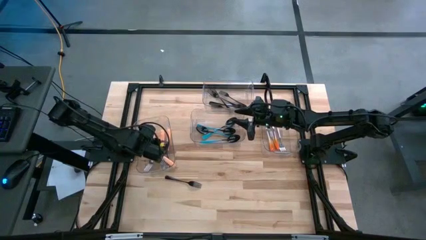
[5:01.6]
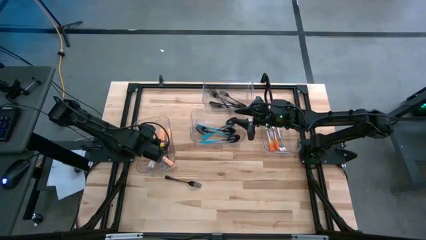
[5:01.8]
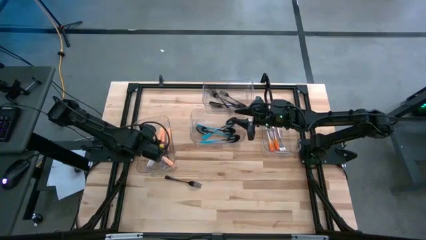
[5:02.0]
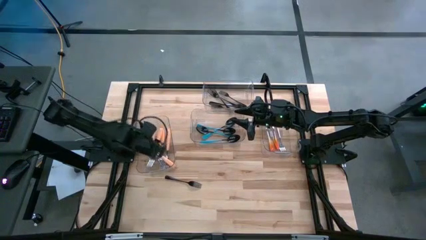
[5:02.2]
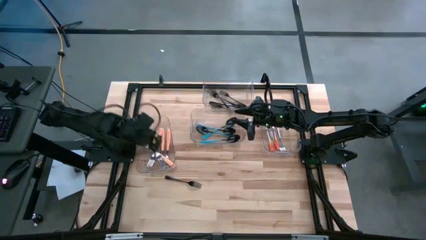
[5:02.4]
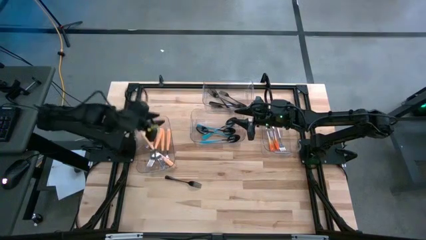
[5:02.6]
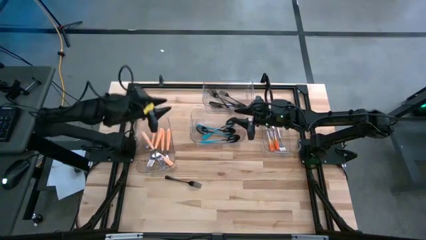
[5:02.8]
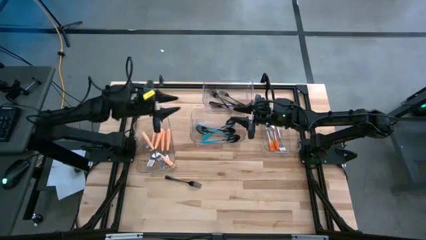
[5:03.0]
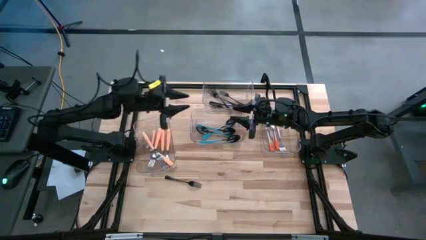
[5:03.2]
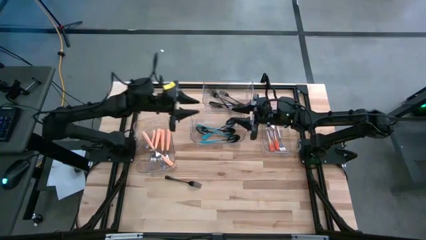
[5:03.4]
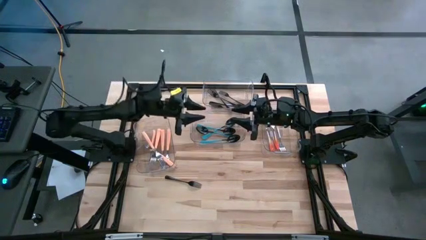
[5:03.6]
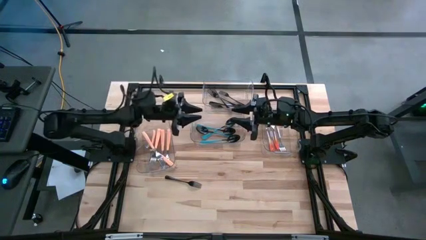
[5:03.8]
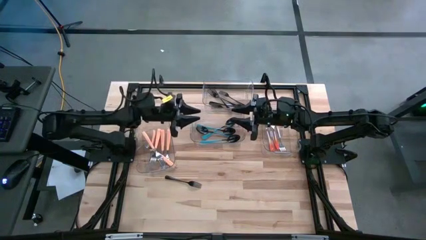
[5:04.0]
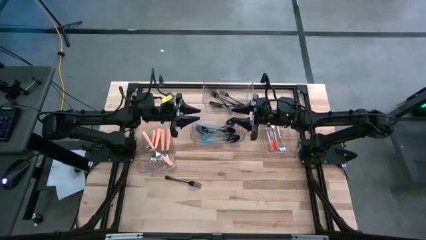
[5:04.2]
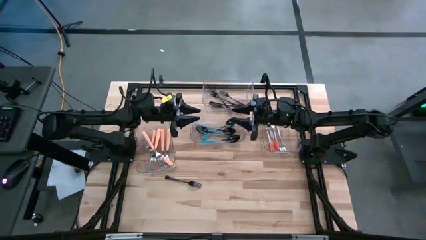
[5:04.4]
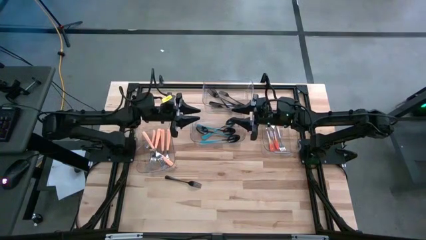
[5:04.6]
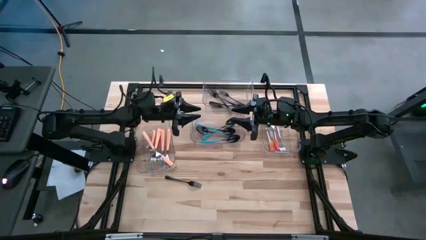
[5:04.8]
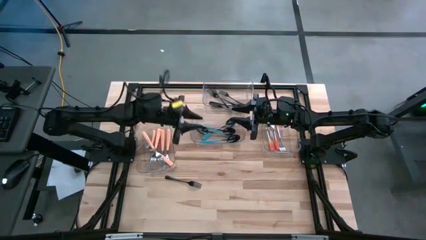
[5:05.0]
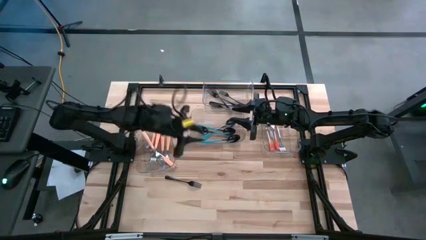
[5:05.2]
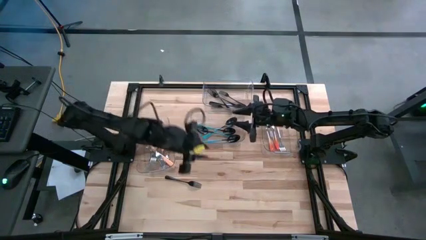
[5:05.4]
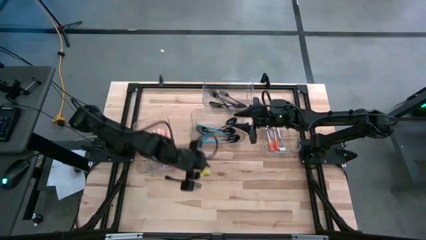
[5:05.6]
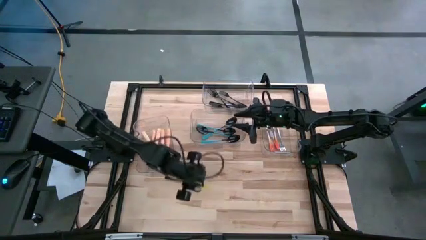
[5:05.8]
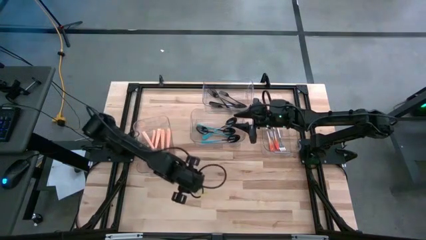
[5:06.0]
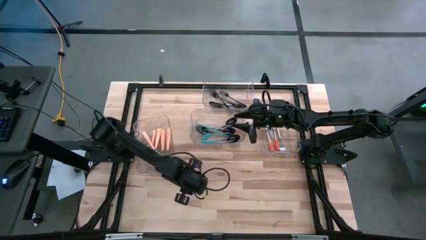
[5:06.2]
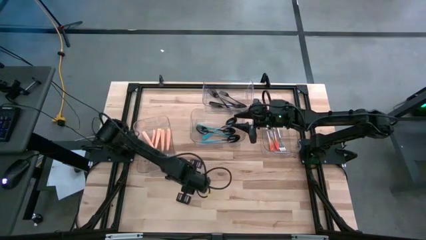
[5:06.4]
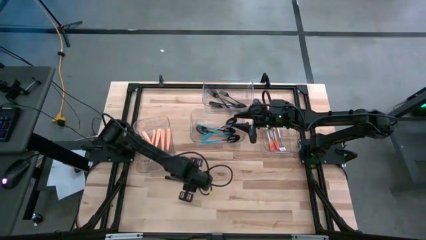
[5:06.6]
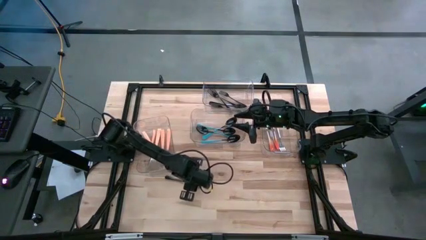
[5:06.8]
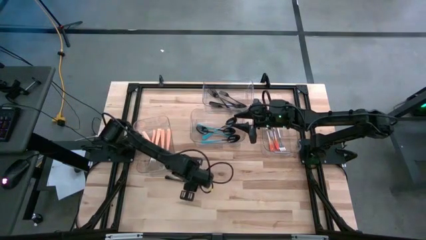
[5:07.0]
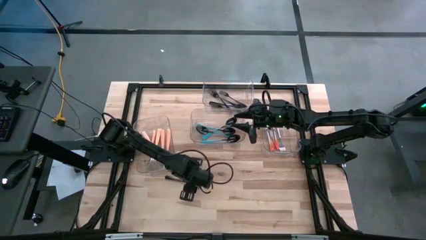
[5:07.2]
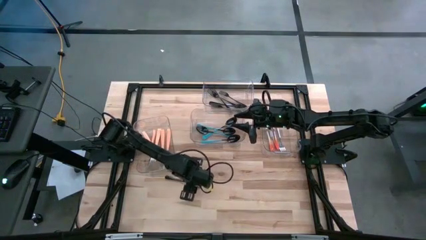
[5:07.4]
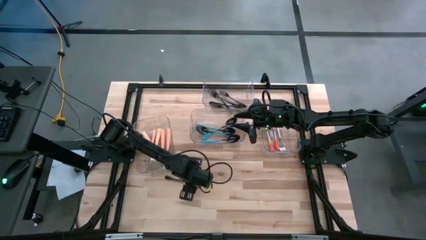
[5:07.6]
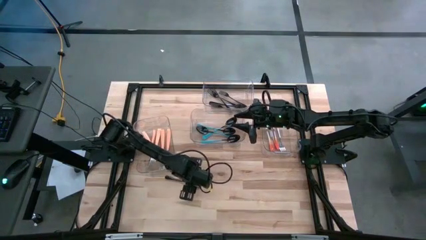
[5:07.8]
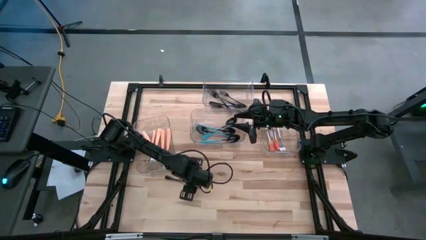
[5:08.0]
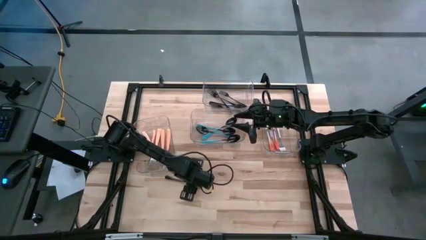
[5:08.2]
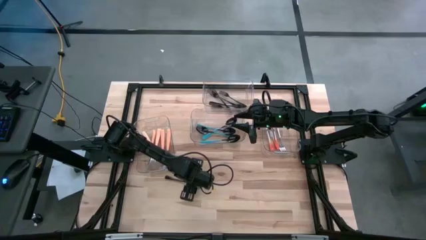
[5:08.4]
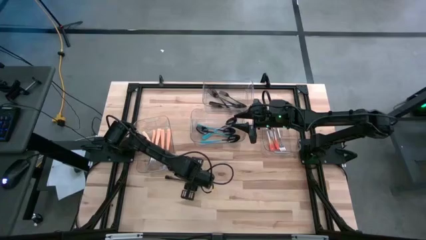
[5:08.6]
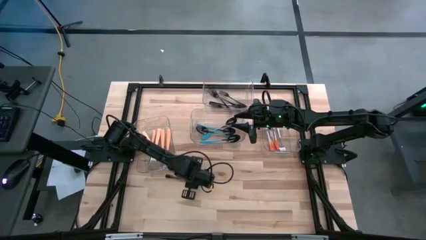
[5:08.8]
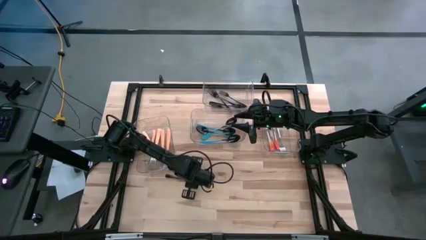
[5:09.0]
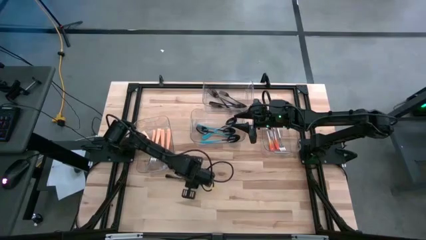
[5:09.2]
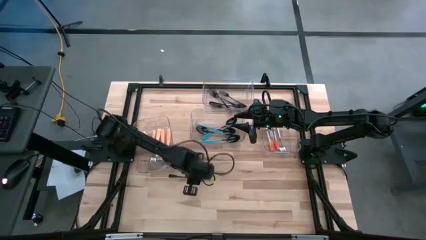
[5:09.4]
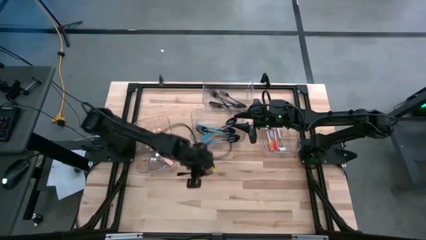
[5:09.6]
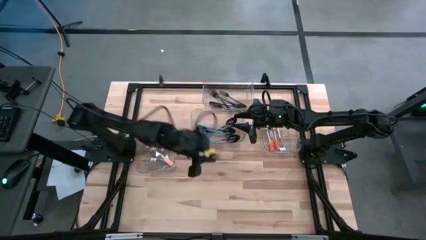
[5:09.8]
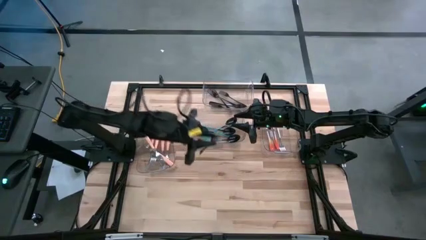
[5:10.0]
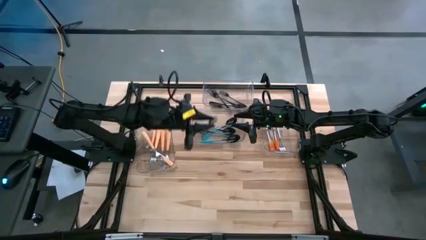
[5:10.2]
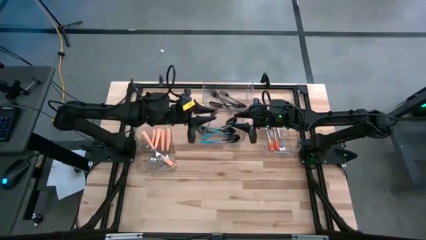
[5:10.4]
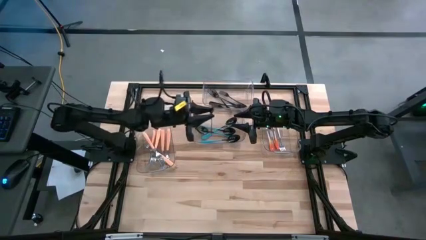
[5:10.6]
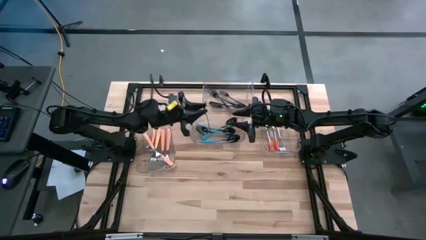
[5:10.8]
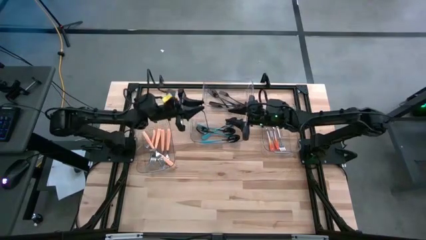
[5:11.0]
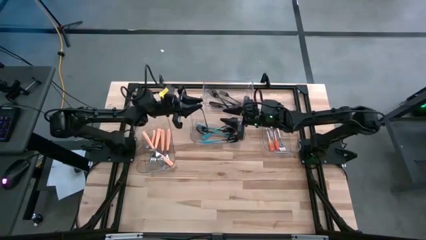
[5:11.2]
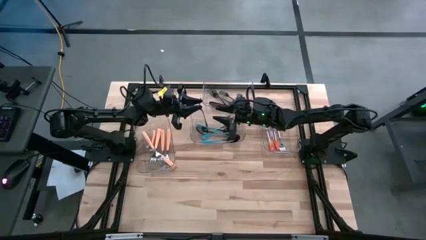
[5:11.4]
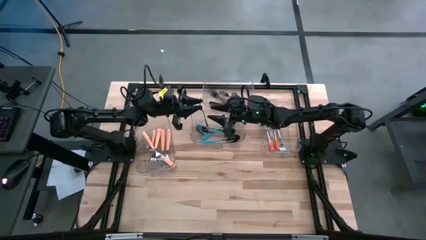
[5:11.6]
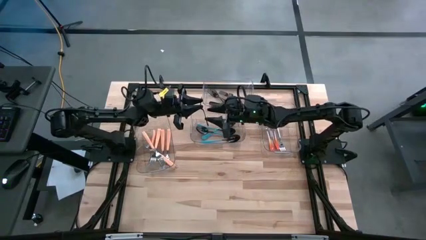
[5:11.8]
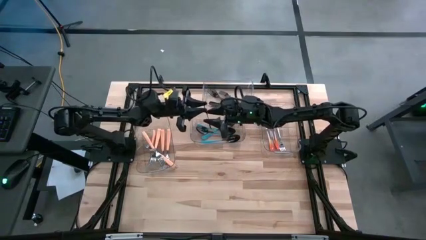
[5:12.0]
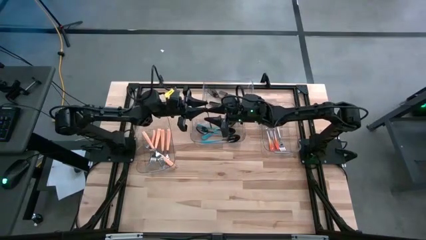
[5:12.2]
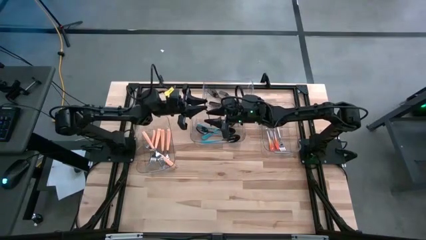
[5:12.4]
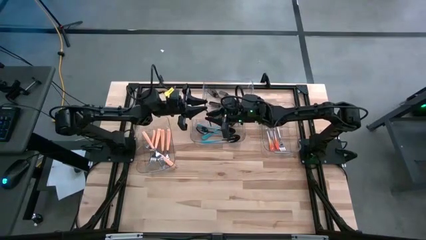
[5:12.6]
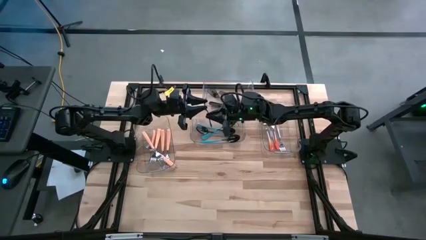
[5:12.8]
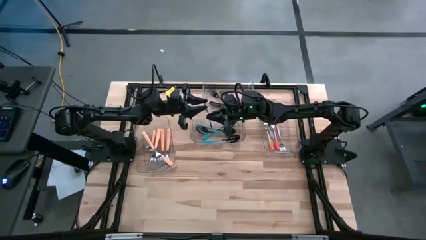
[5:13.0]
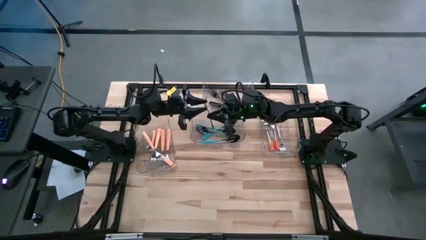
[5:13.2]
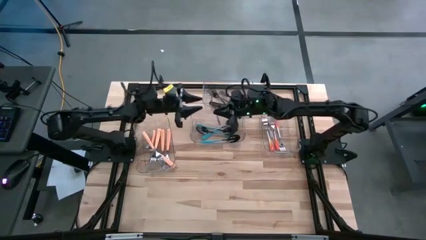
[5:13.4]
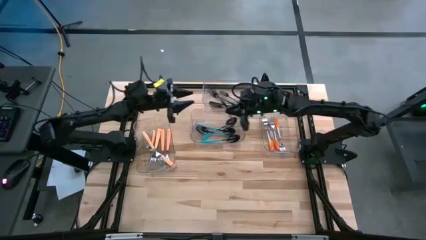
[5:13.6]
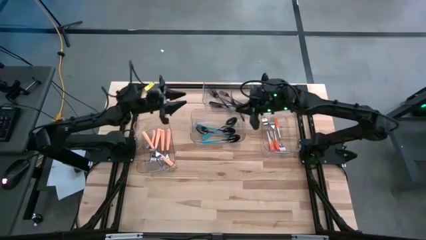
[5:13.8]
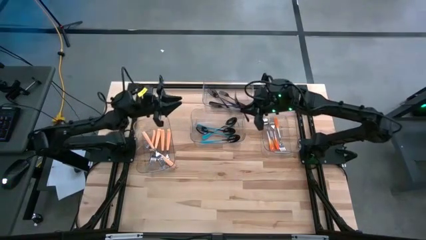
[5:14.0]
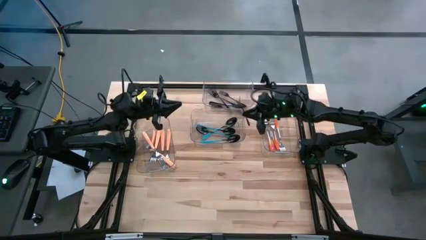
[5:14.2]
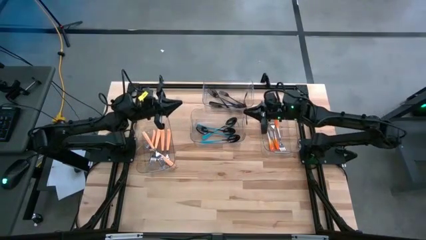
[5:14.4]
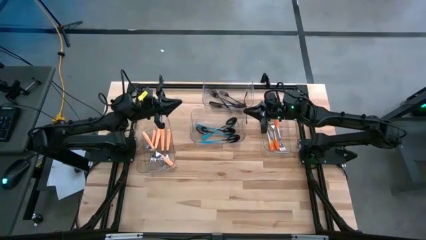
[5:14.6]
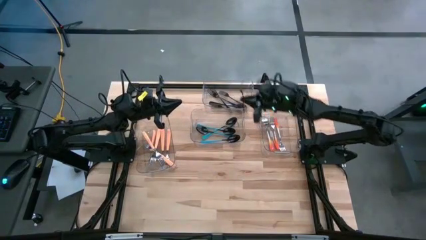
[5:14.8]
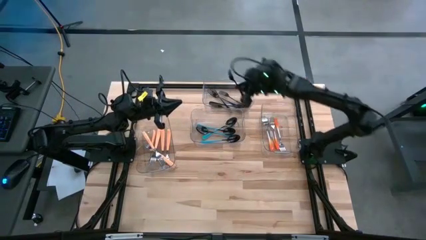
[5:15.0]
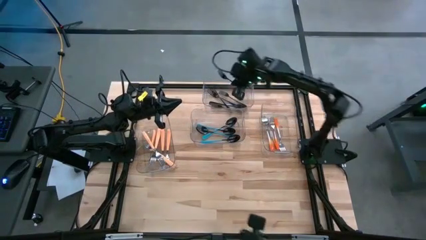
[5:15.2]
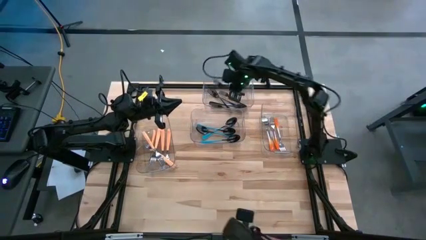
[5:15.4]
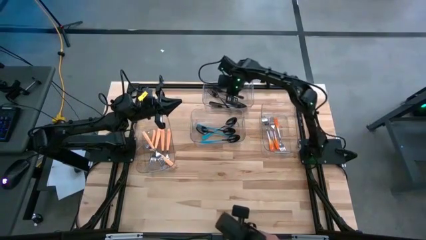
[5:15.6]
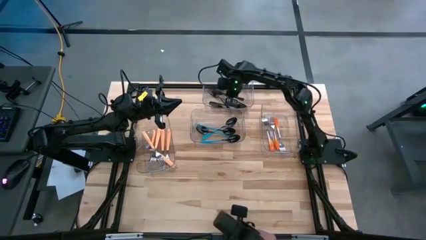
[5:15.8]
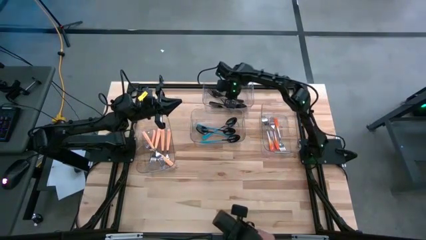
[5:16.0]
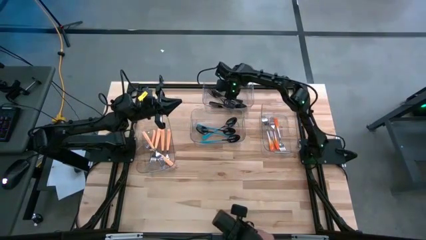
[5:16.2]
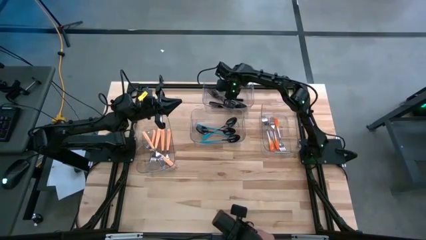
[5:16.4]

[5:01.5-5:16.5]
Task: Sort silverware by color (type)
Put the black fork into the top transparent bin
